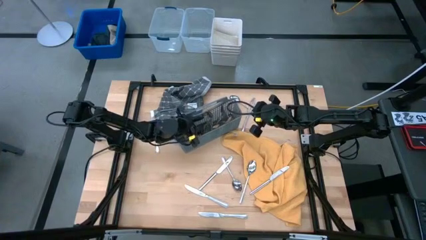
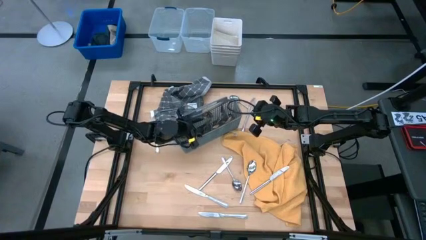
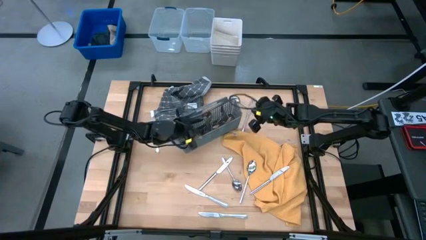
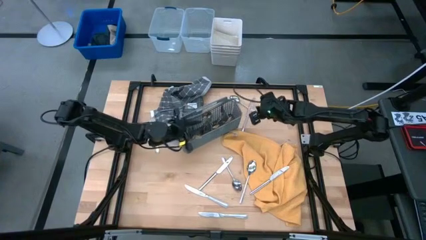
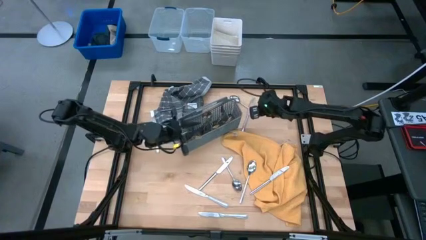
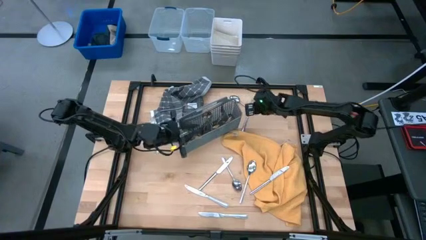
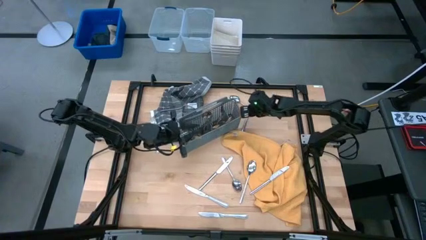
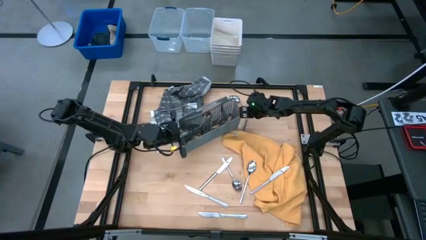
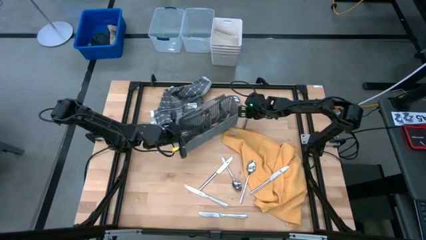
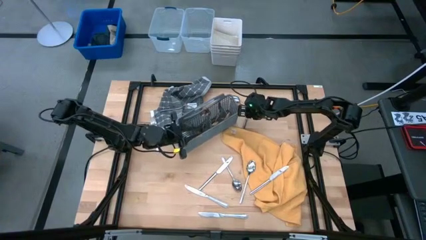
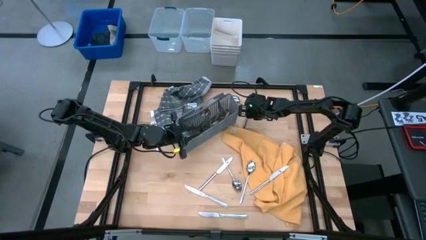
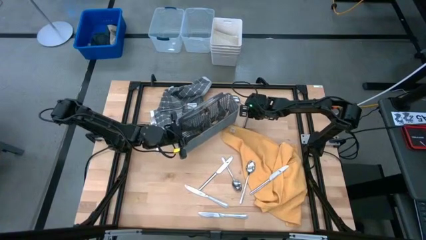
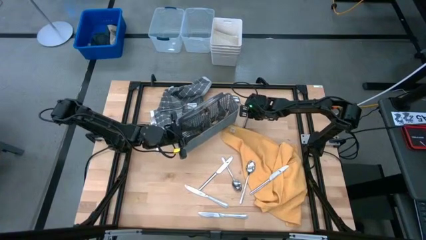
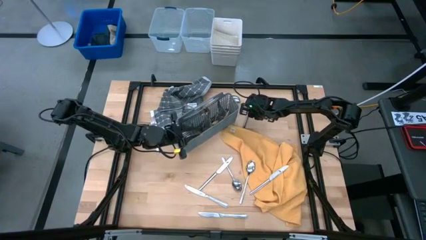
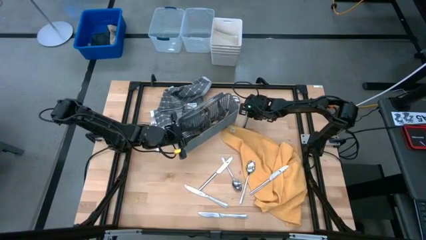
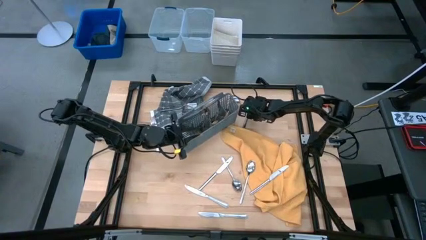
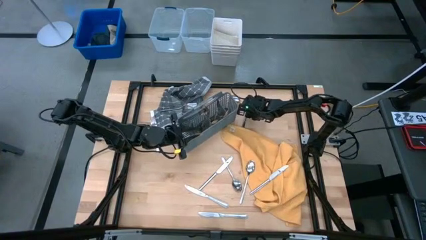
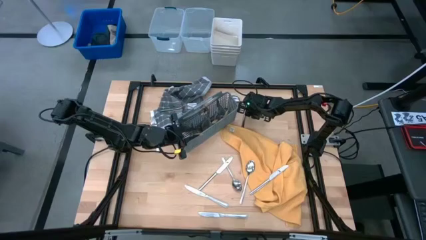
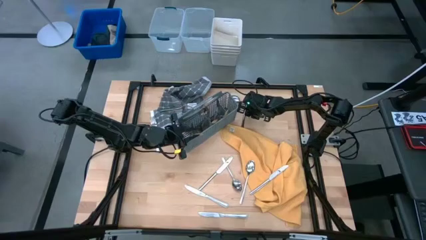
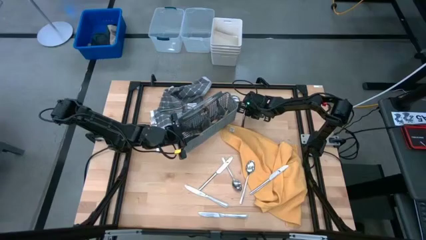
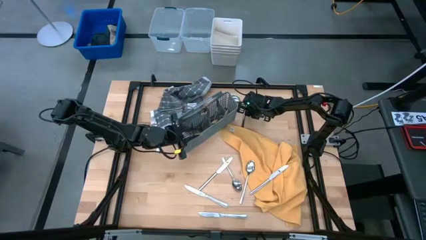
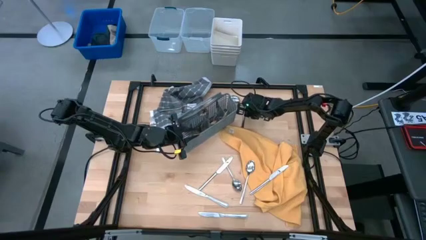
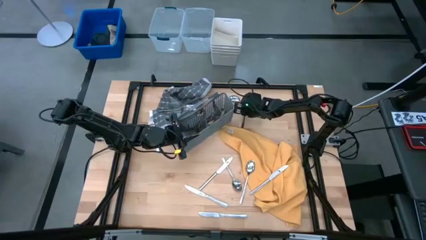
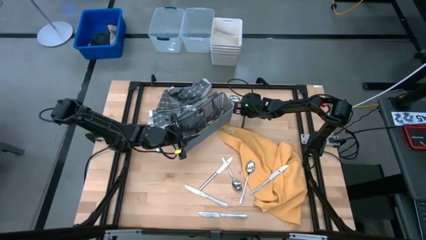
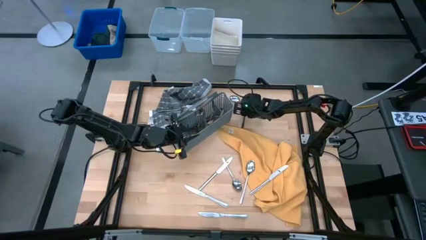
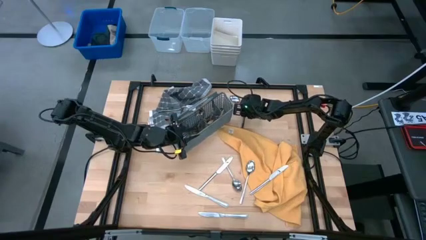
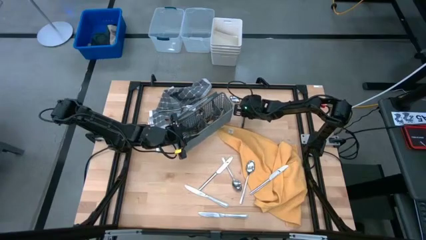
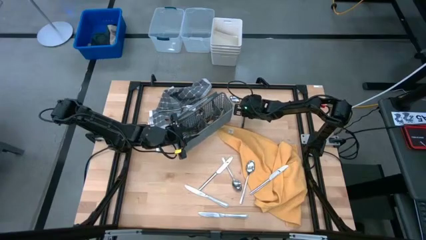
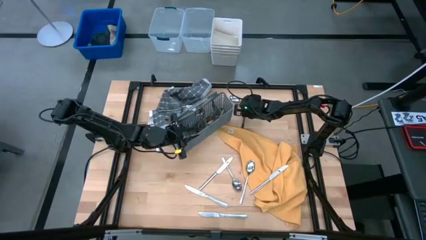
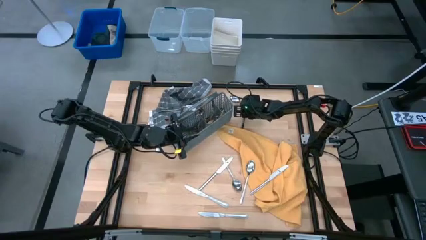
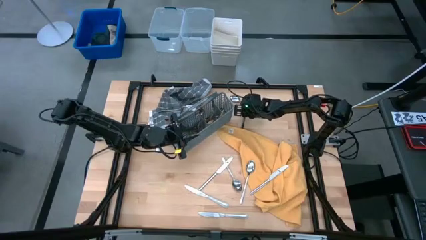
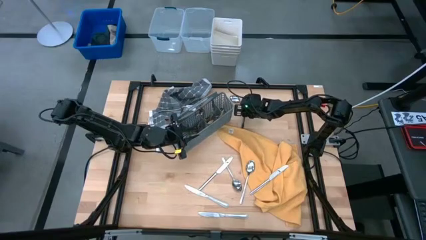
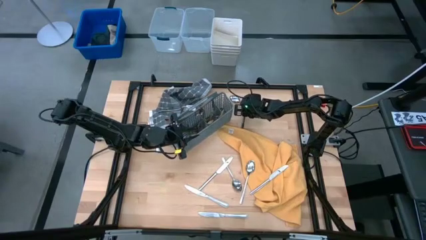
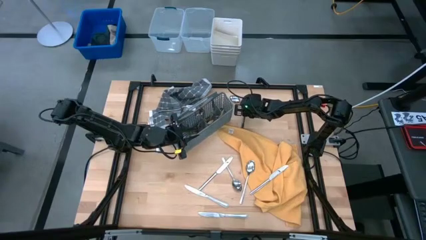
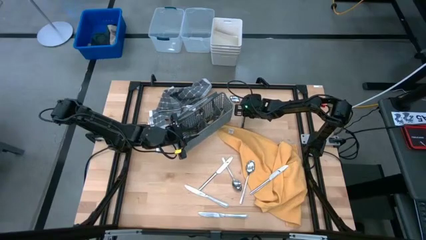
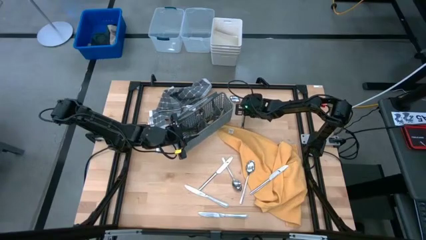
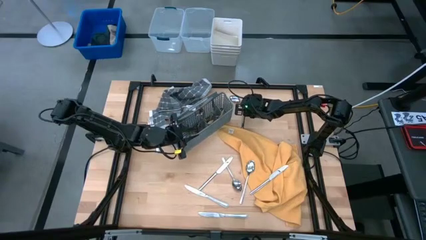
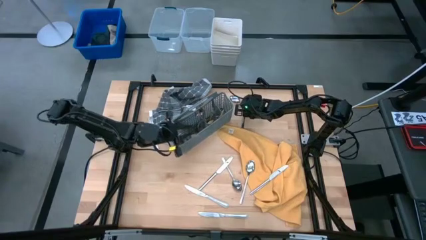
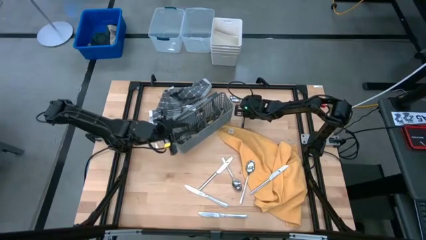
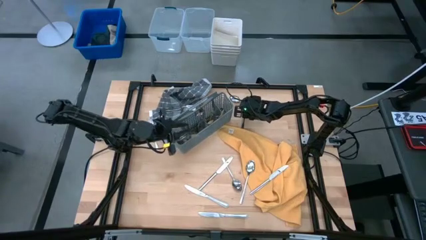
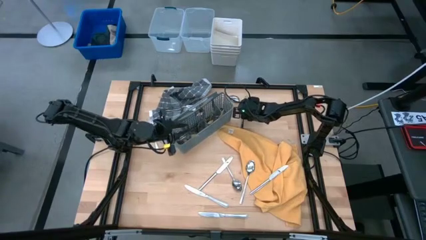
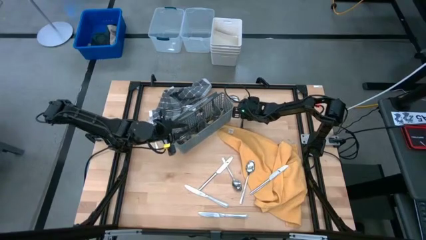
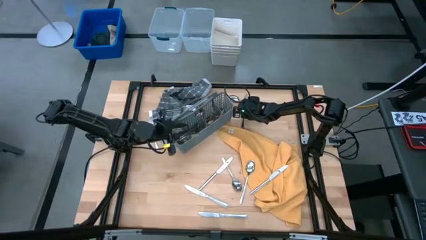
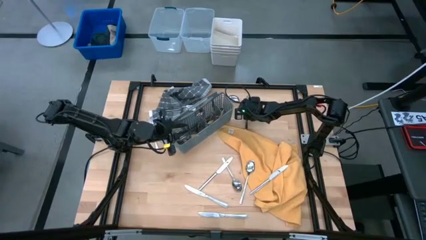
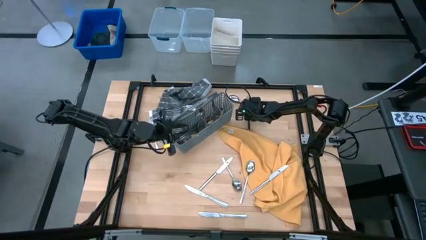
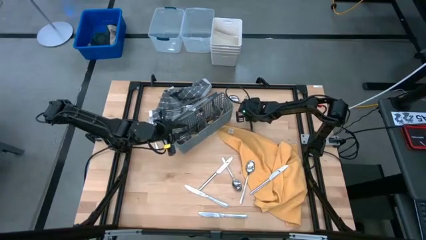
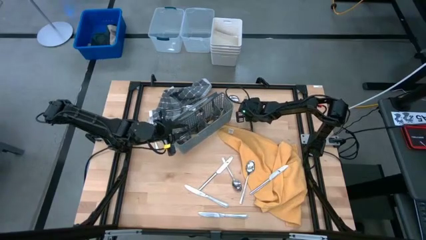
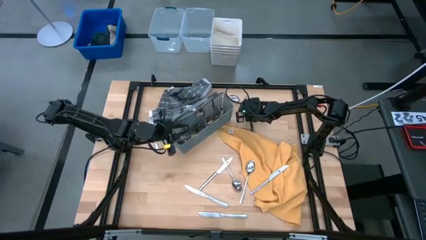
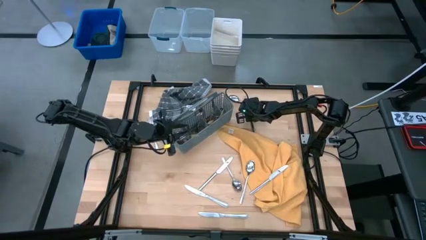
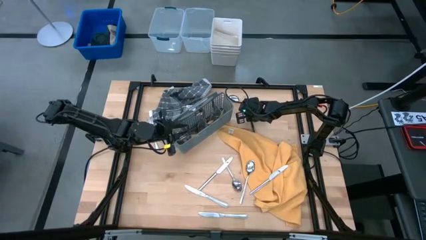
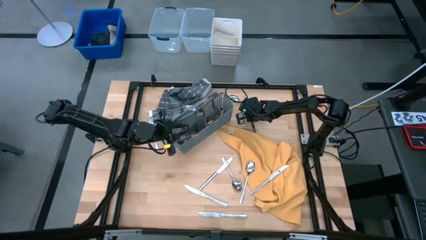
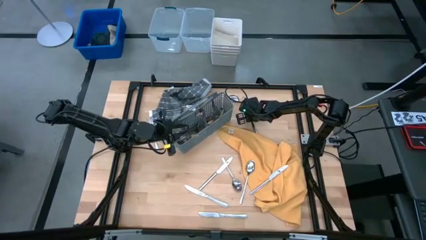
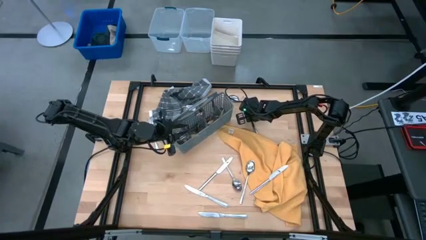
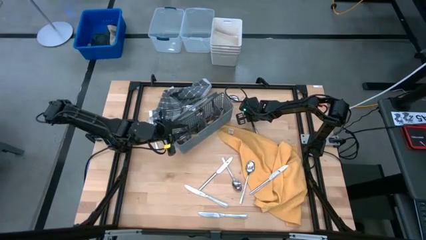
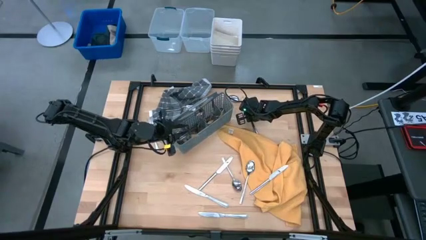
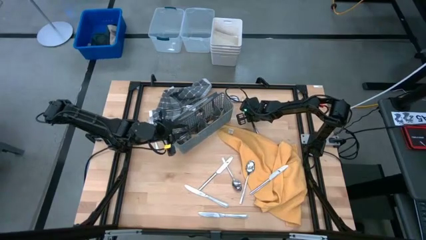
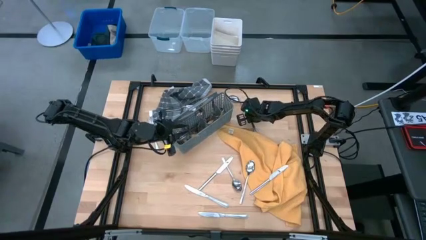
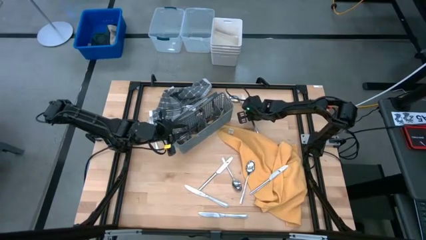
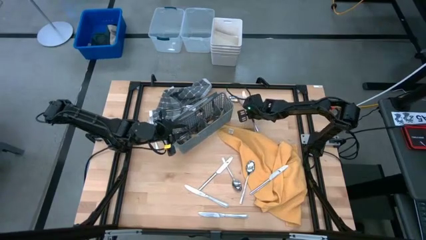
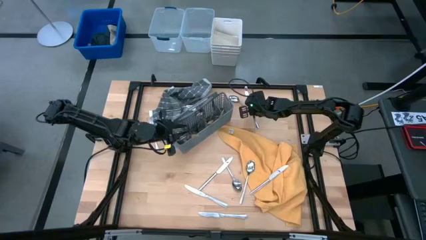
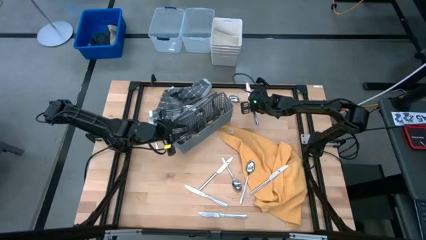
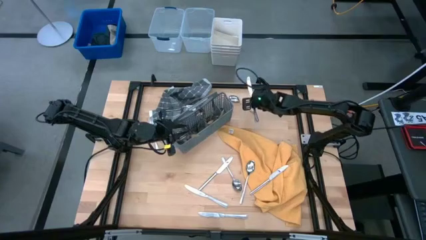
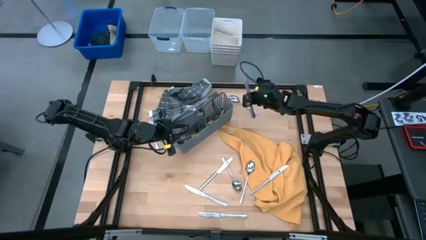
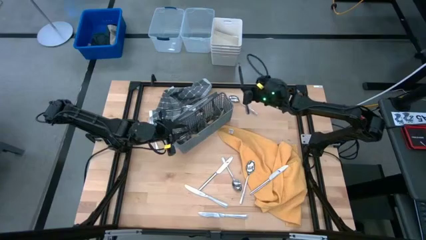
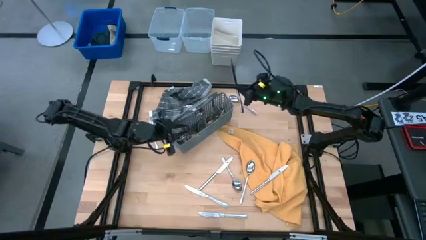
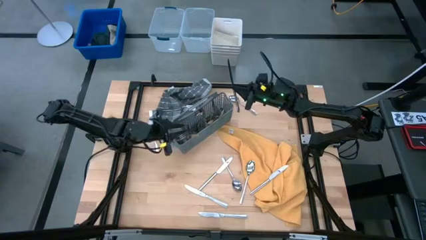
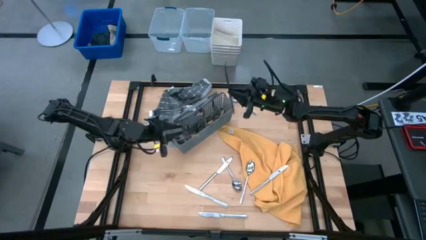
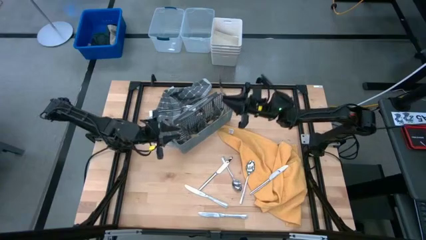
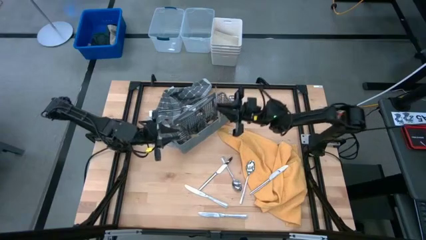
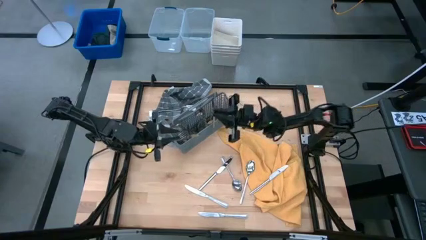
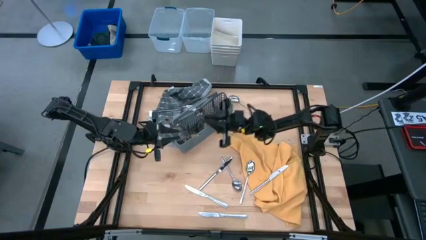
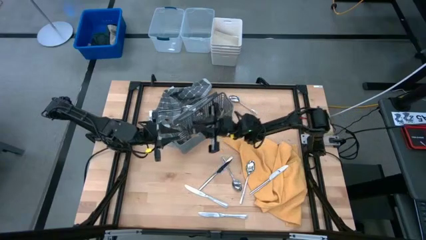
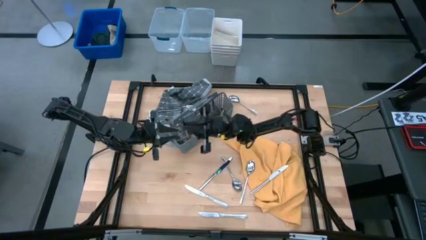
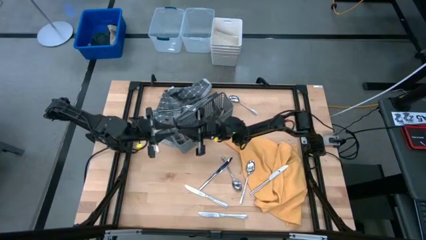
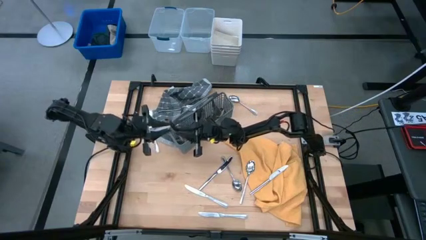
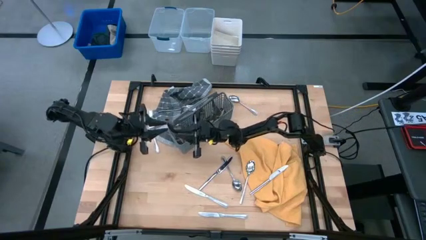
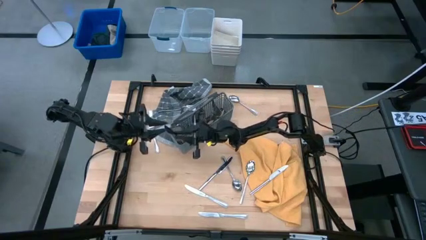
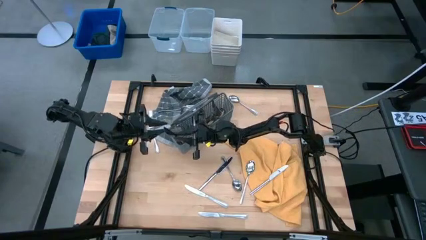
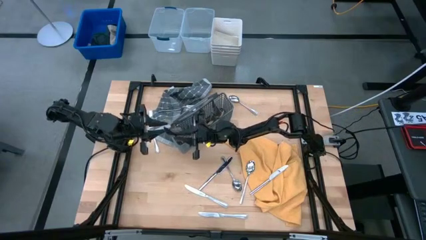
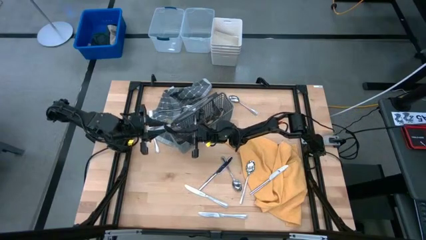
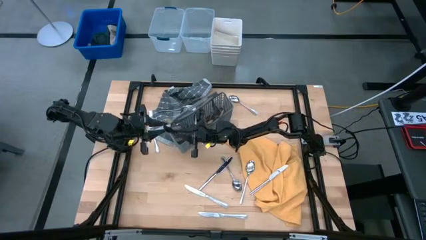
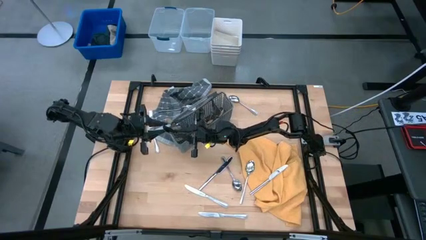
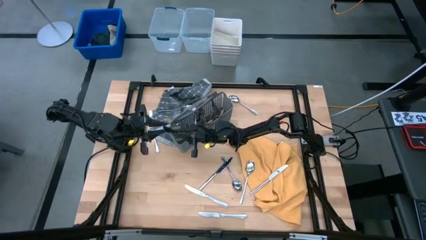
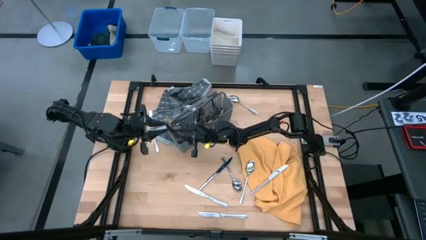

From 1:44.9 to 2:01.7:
Task: Sort silverware
Put the silver knife into the gray silverware basket
